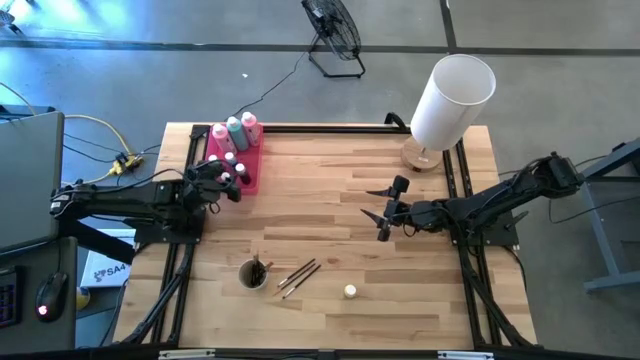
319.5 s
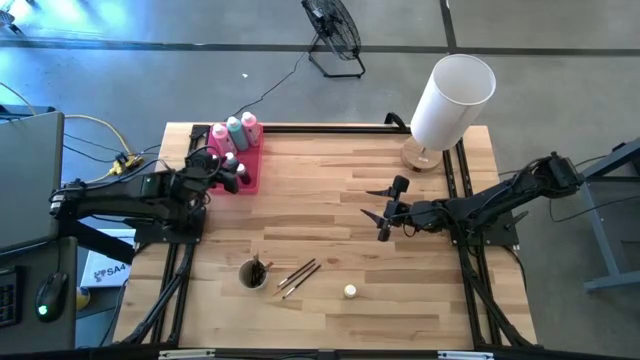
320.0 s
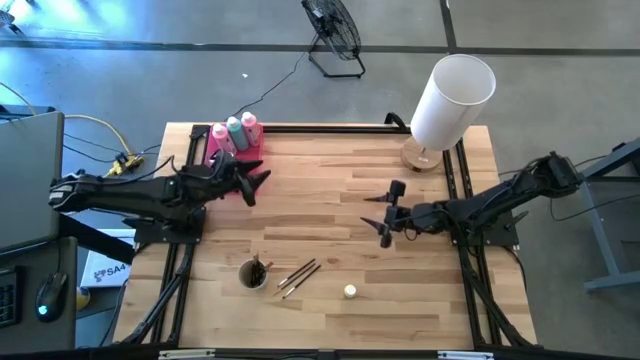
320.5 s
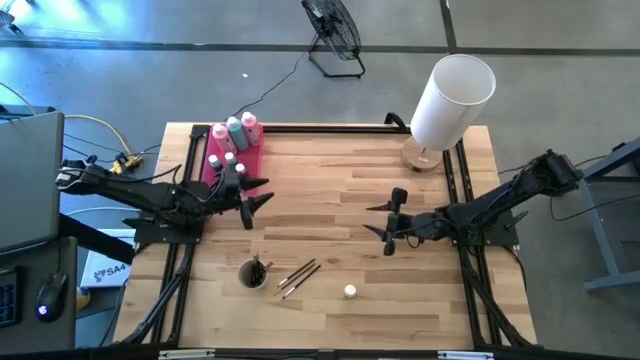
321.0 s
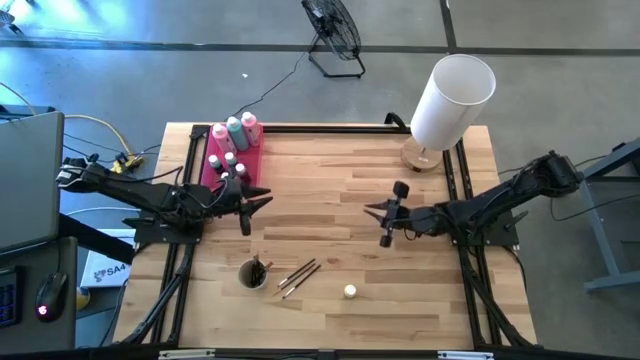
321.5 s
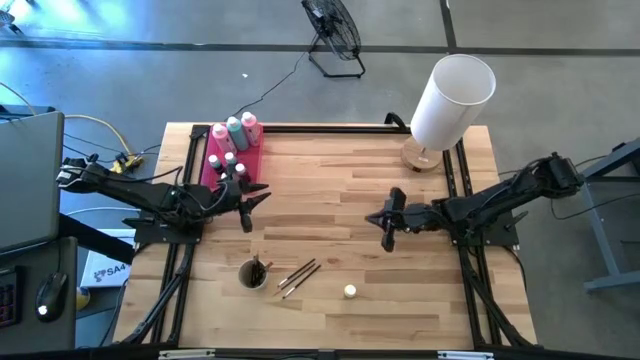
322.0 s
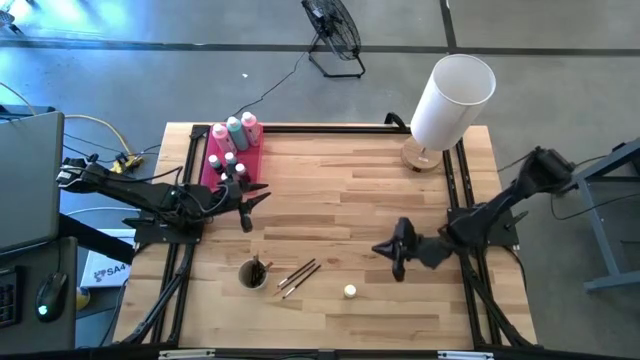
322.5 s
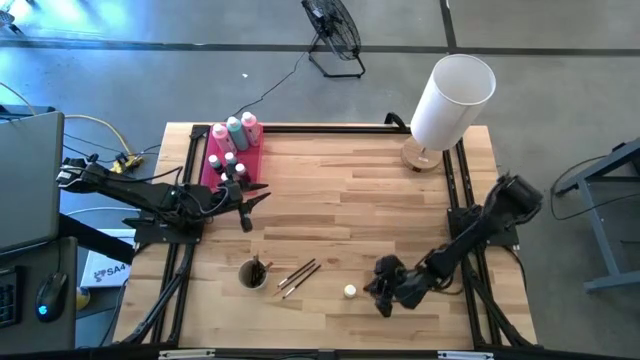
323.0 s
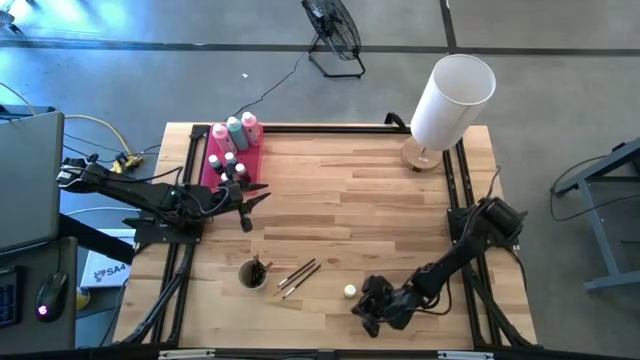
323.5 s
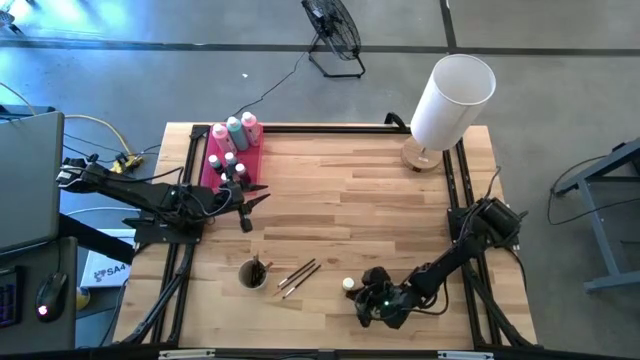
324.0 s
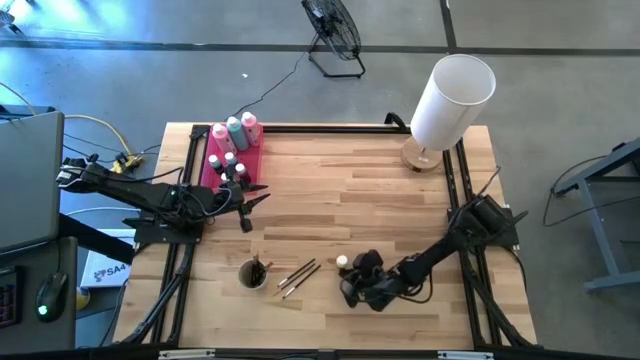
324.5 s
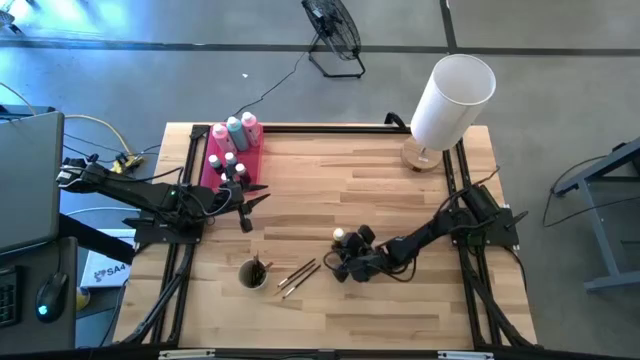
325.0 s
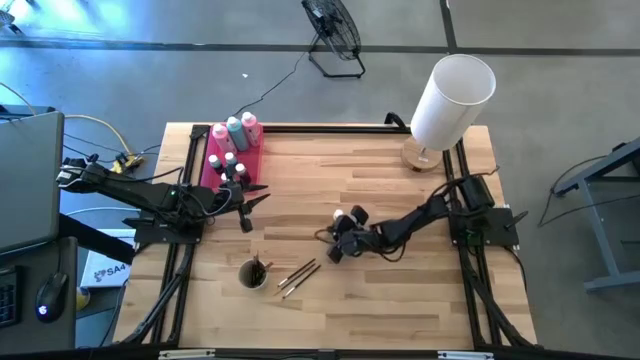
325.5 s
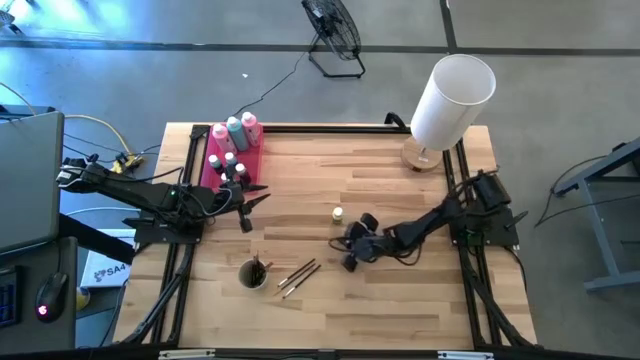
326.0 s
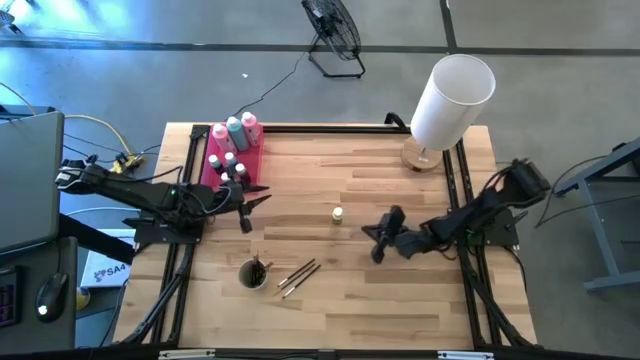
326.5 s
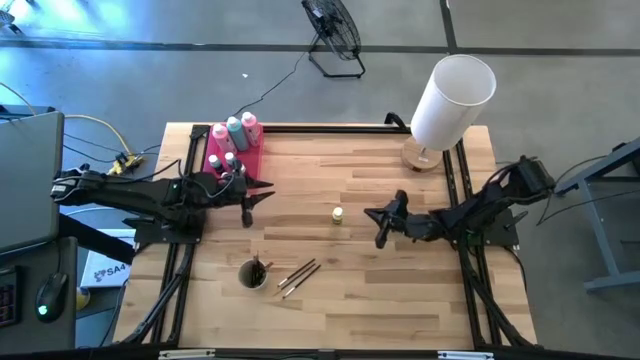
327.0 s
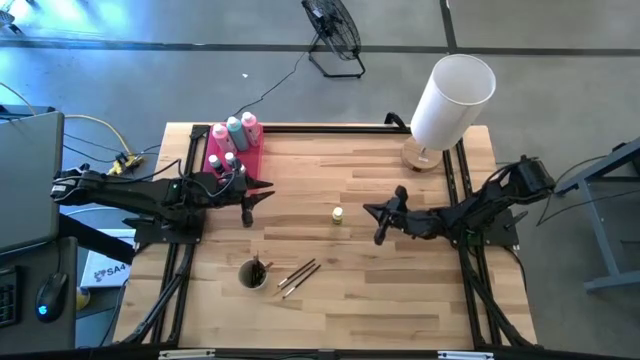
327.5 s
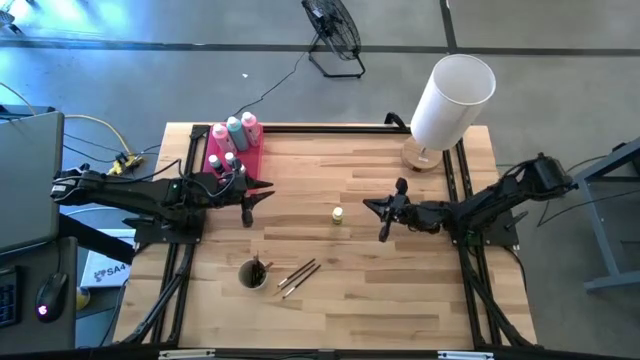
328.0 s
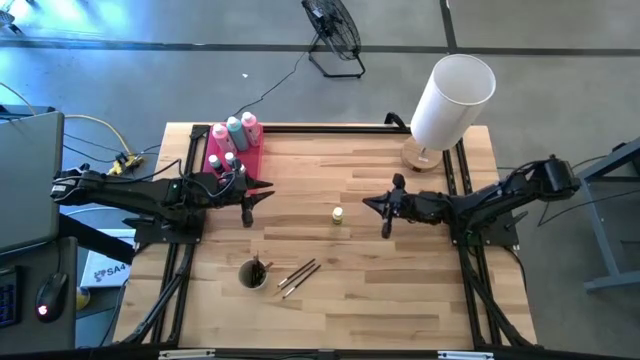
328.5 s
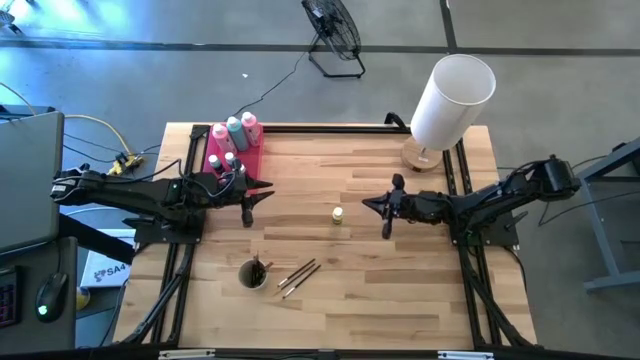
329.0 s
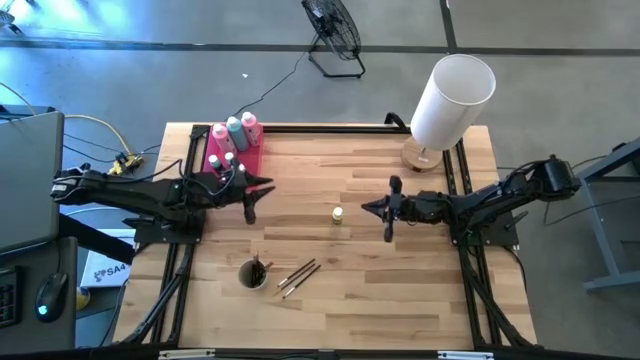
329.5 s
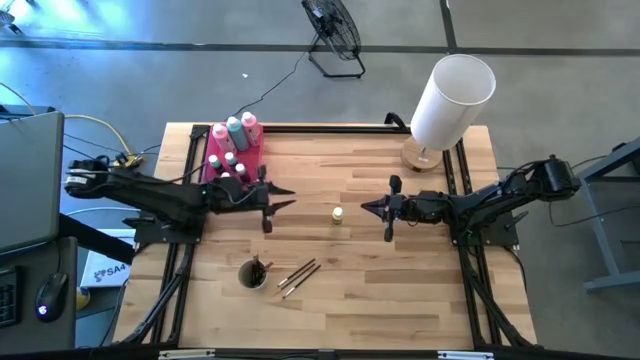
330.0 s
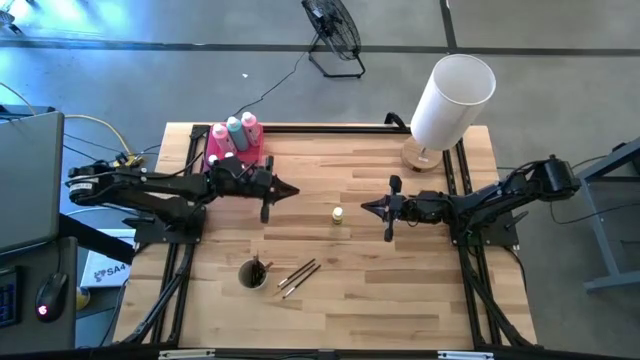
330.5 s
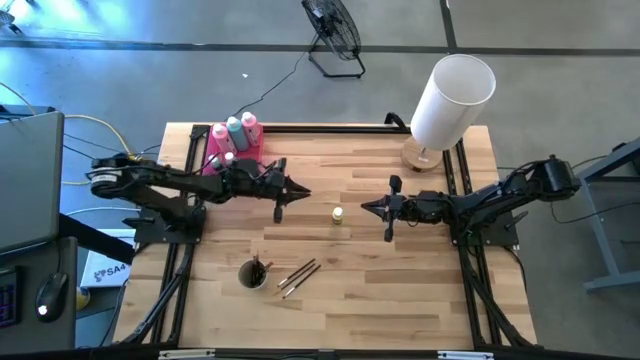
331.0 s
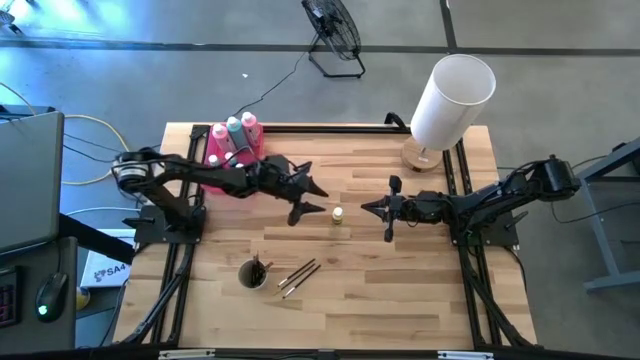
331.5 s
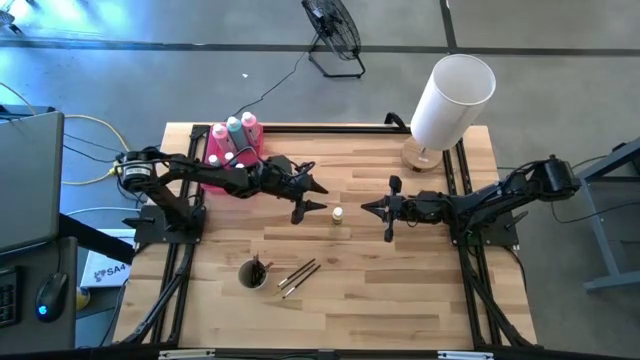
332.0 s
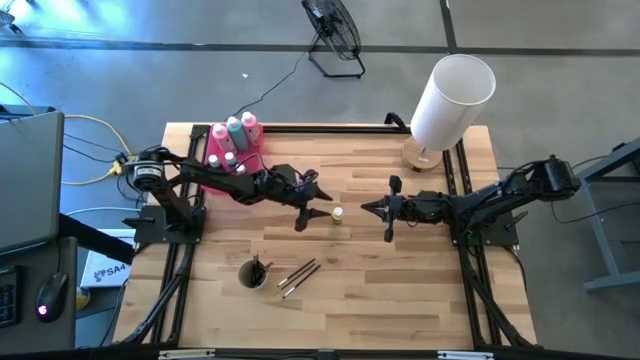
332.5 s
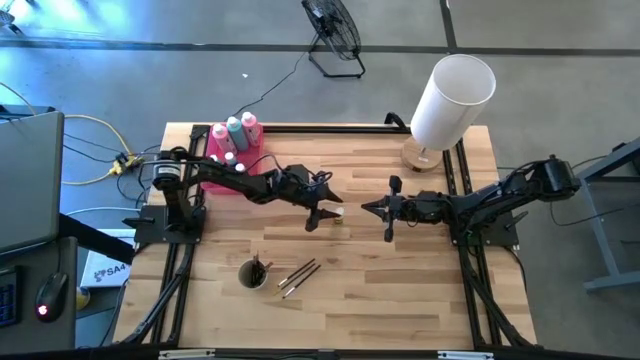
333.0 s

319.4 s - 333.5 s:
Task: Pick & Place Paint Supplies
Put the small yellow paint bottle into the pink bin
